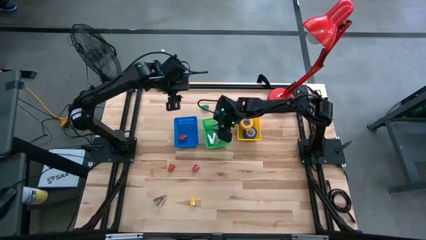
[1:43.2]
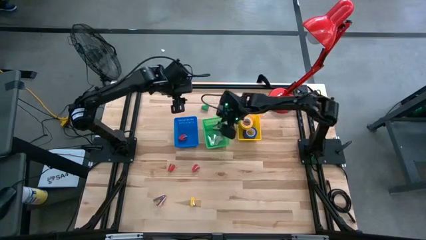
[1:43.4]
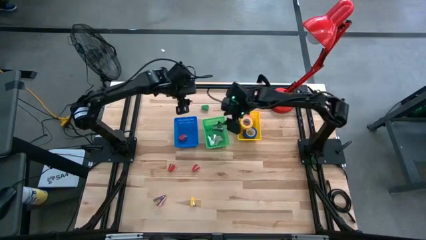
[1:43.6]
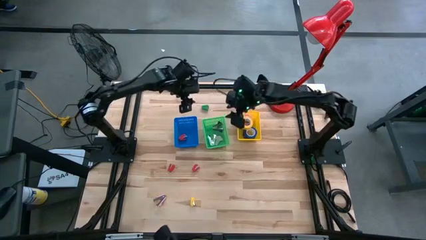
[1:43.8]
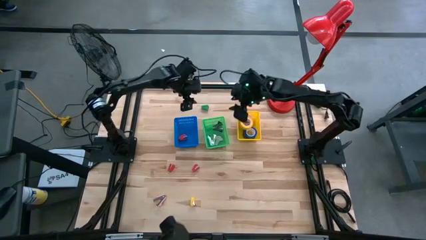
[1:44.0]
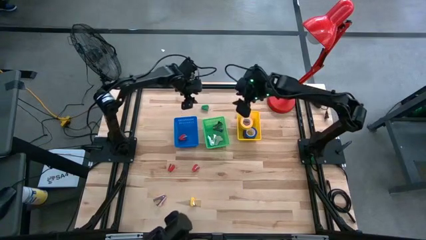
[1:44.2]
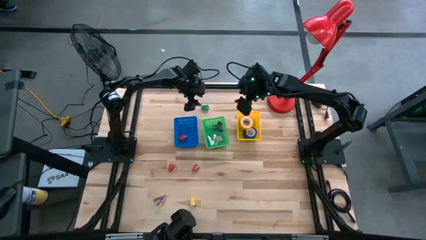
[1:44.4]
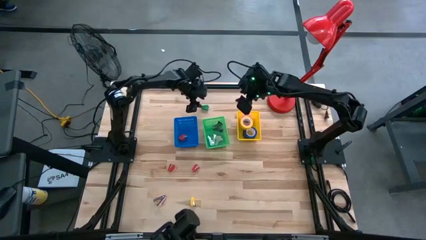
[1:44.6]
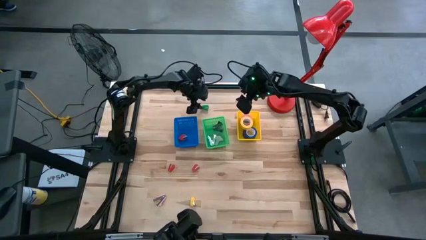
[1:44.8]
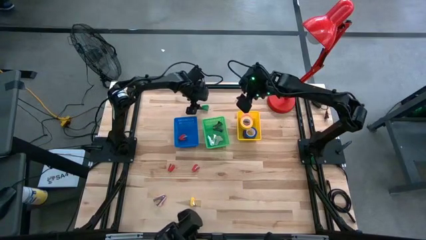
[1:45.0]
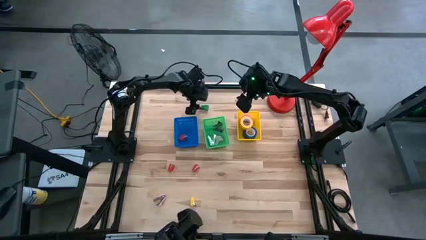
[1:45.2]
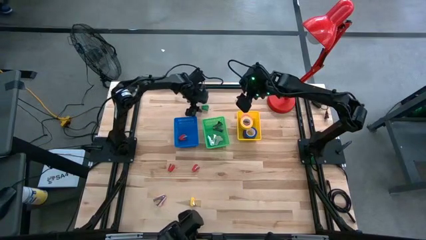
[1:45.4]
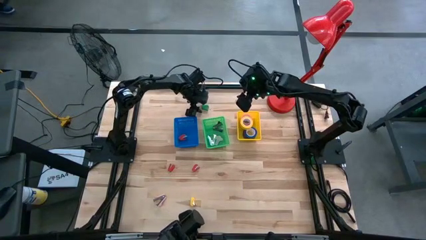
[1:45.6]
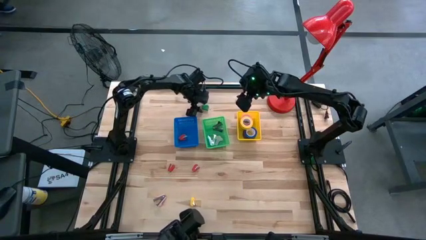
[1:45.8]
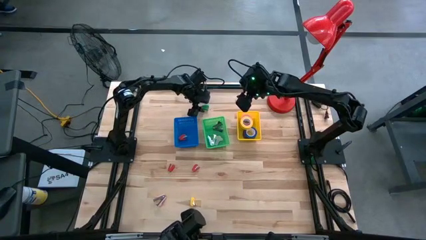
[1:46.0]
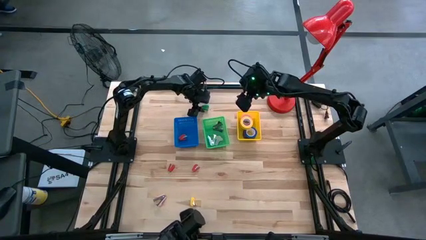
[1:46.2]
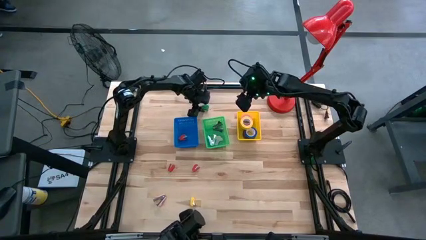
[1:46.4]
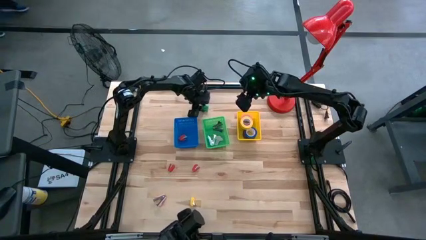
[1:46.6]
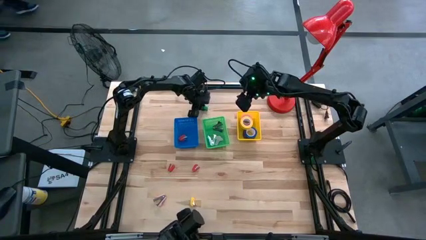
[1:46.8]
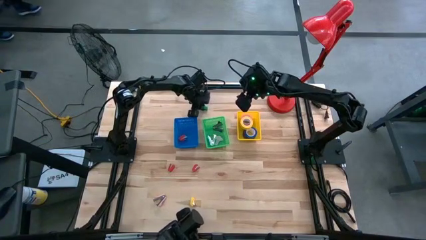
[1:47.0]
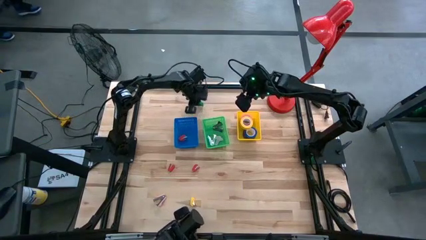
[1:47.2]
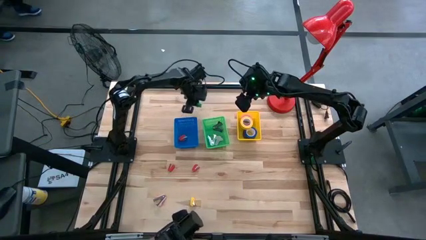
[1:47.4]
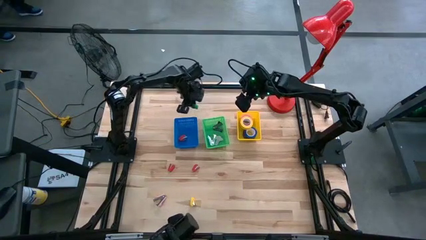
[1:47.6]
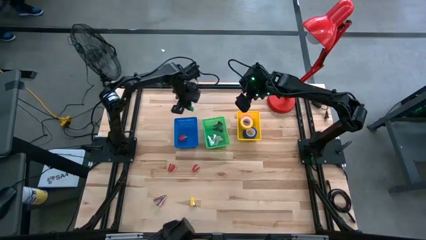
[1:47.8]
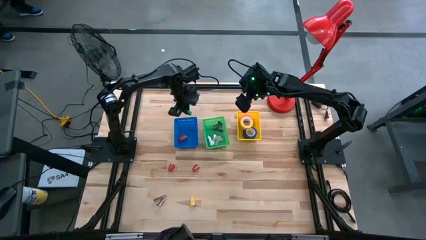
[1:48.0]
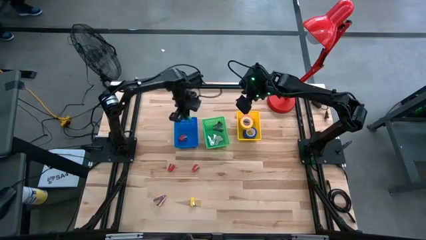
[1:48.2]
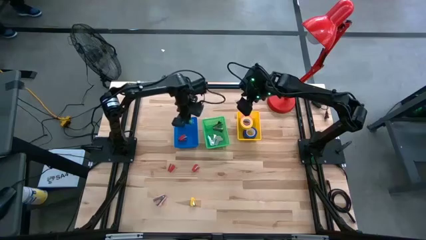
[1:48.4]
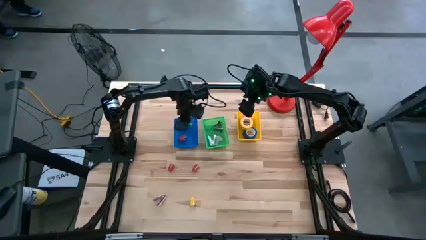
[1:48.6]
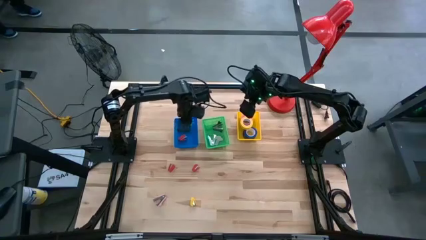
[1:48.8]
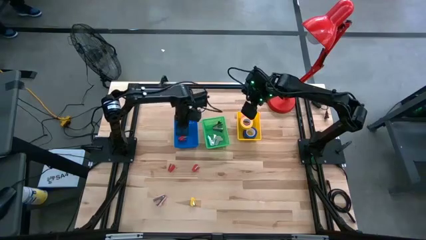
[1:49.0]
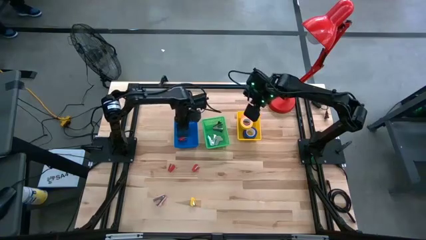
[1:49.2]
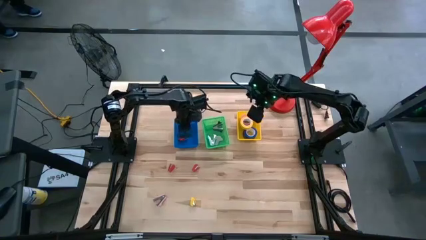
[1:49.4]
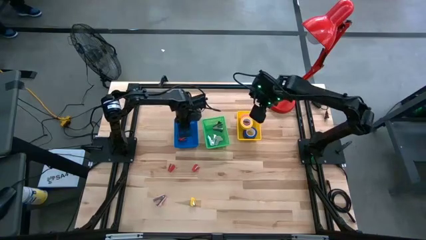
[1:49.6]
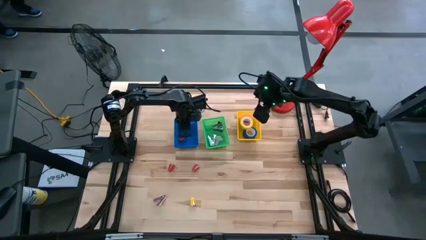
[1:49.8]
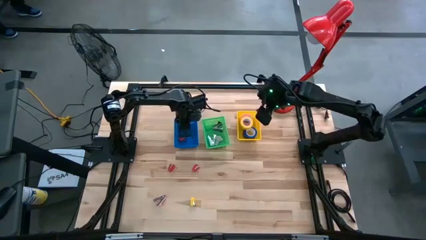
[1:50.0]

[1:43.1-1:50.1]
Task: Pick and place Stapler, Stapler remover, tape
Put the green stapler into the blue bin

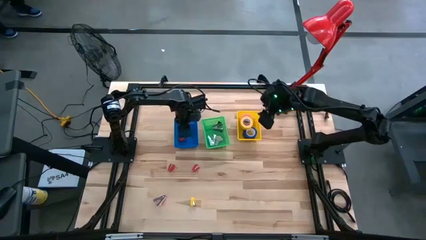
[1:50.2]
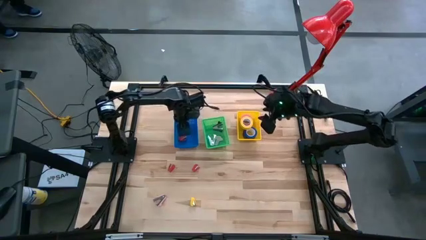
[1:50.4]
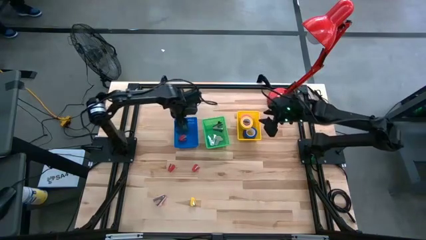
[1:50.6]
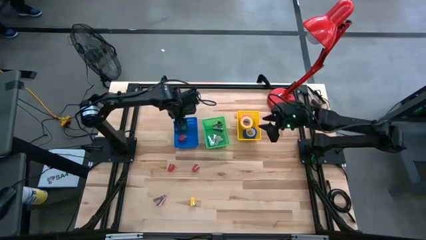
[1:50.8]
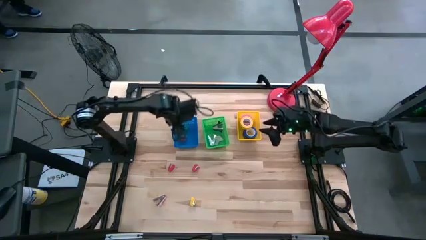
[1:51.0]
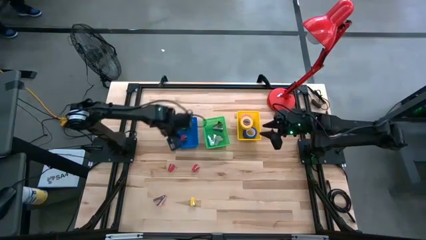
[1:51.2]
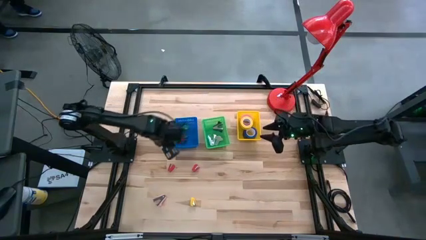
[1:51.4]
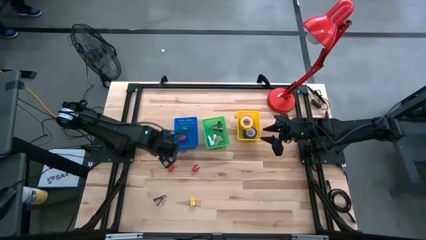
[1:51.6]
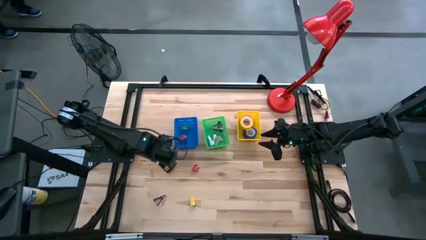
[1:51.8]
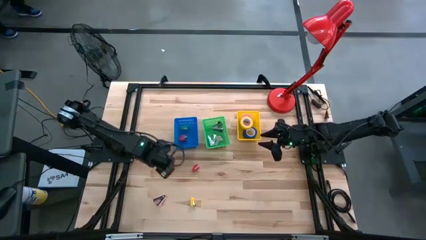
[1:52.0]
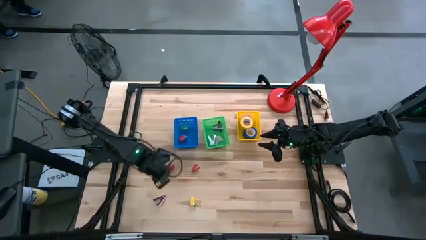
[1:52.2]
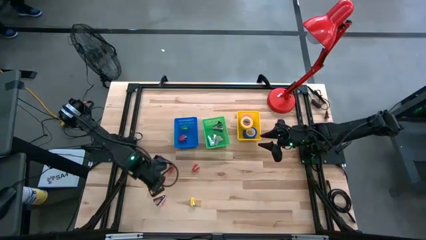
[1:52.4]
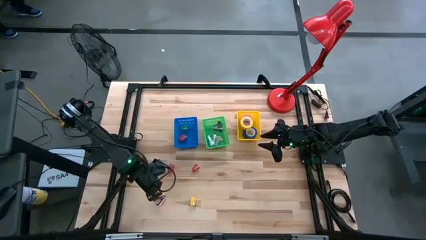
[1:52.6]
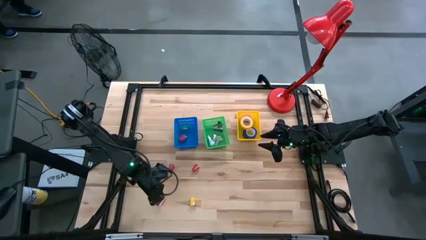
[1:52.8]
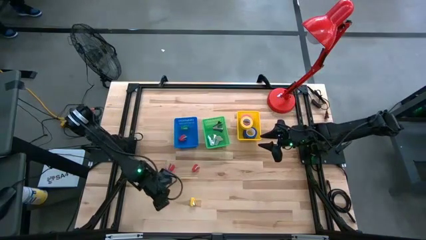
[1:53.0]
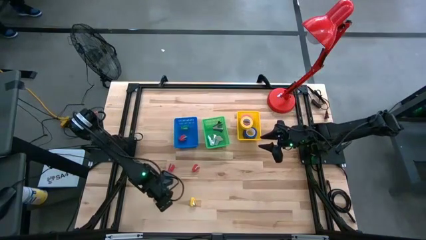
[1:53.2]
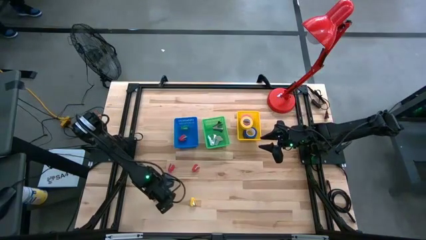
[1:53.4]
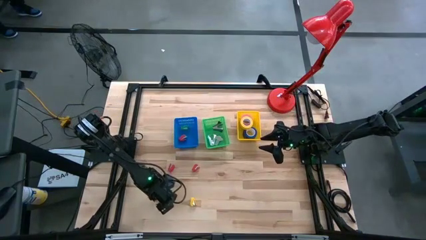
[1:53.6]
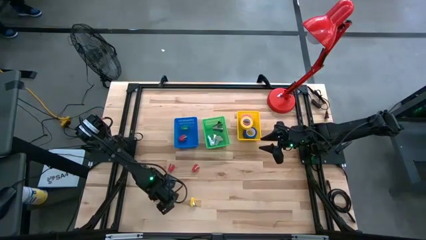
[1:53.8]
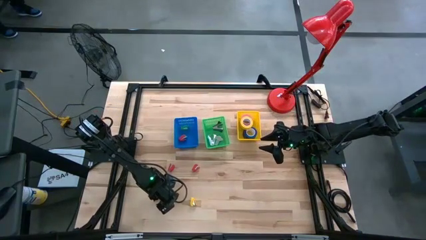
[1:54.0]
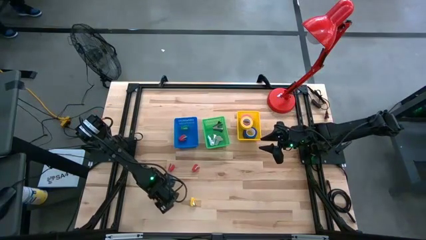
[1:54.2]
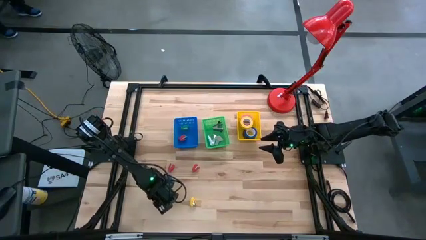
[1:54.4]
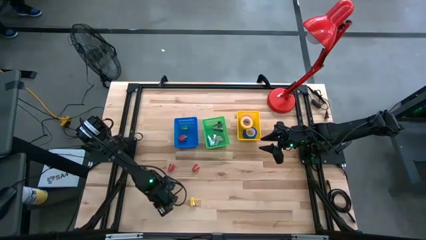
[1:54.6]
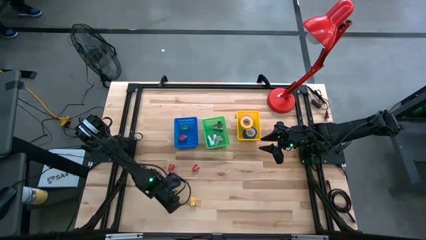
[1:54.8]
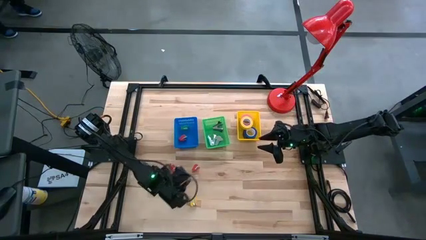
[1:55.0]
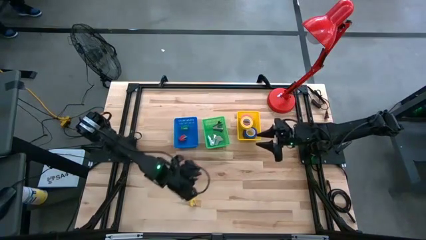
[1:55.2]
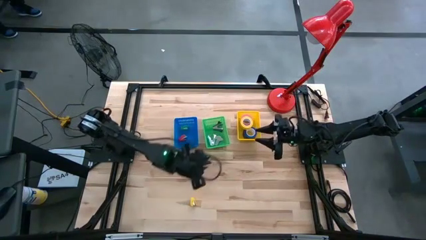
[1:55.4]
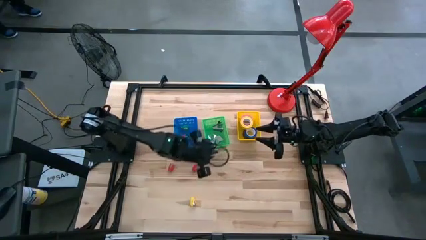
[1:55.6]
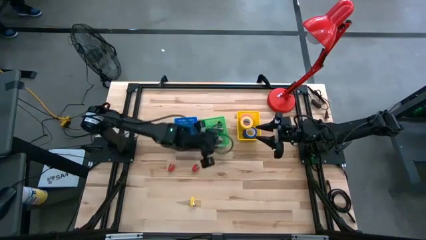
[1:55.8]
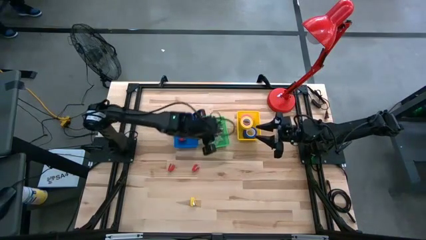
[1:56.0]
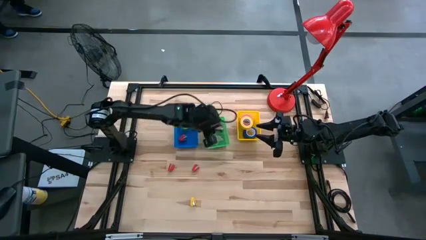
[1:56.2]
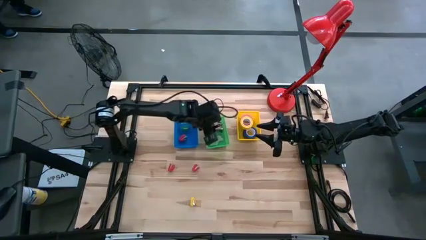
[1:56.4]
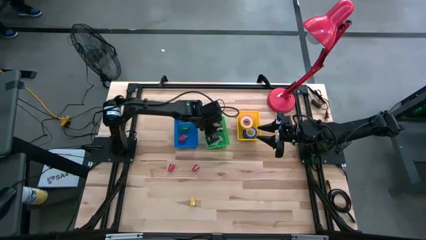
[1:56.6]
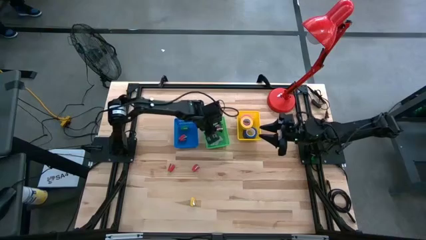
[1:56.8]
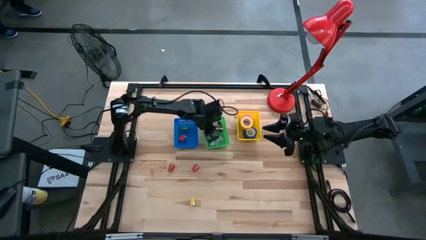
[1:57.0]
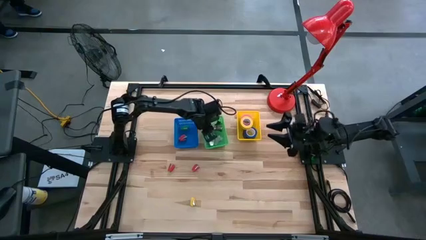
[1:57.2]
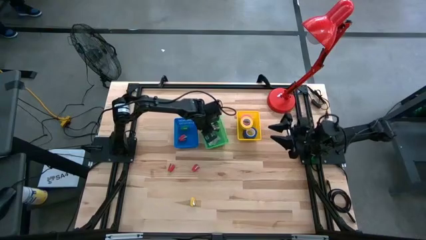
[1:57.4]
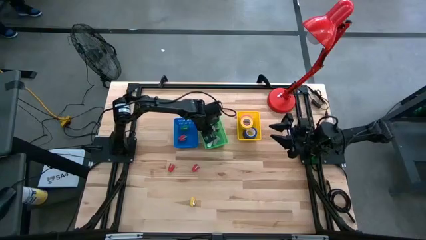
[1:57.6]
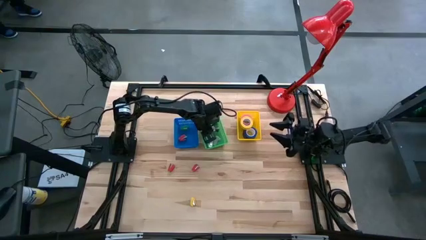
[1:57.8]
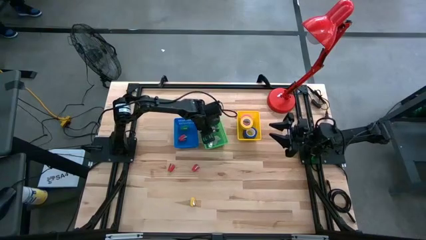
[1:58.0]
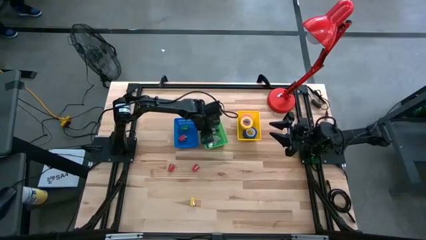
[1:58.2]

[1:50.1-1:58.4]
Put the pink staple remover into the green bin
